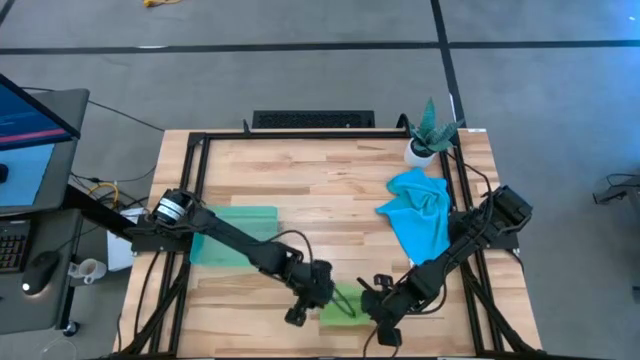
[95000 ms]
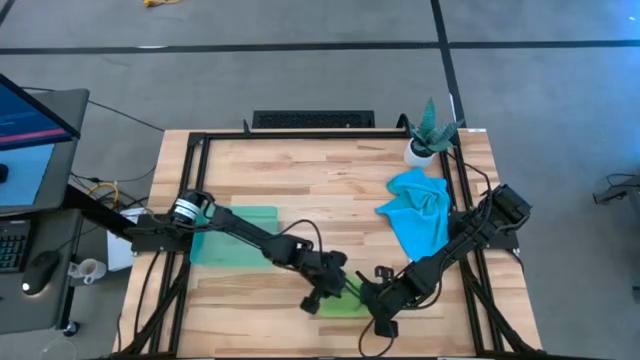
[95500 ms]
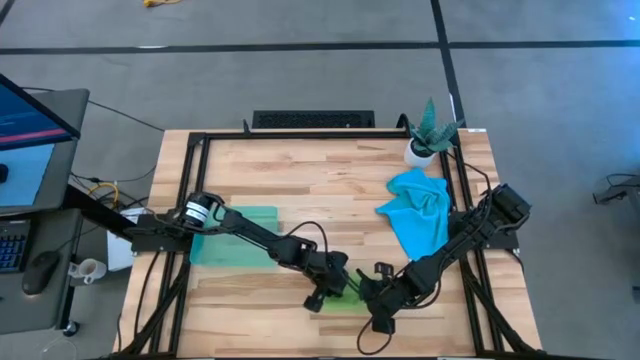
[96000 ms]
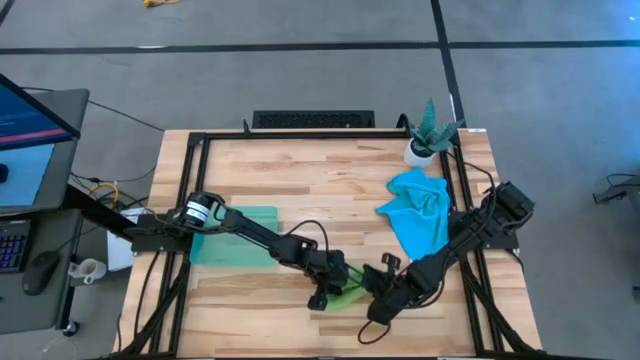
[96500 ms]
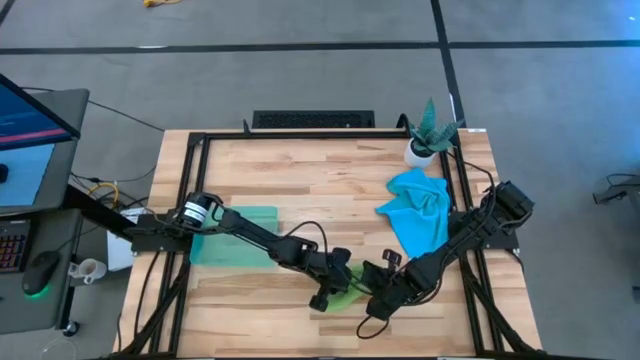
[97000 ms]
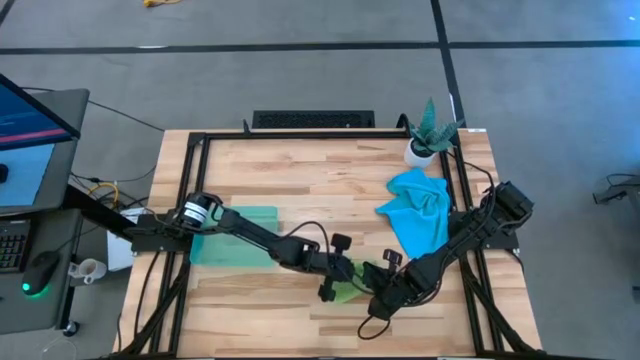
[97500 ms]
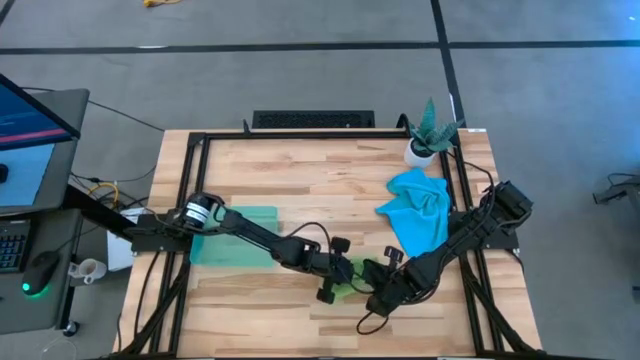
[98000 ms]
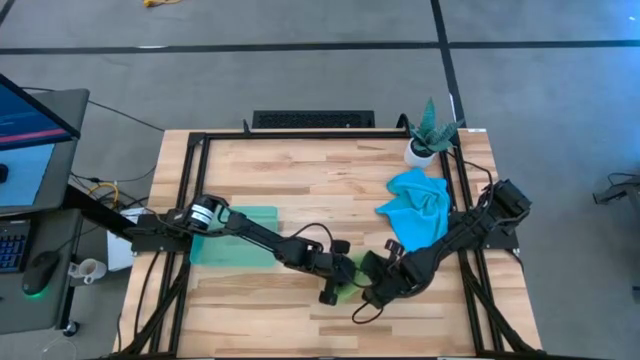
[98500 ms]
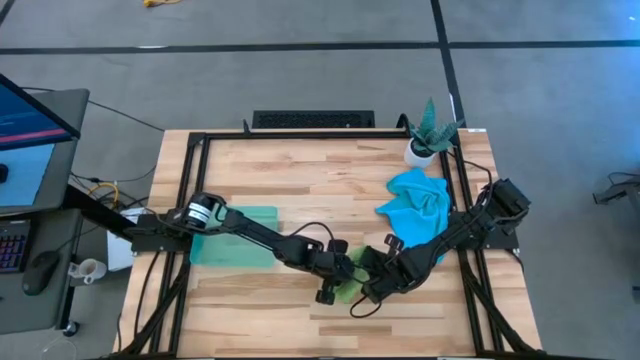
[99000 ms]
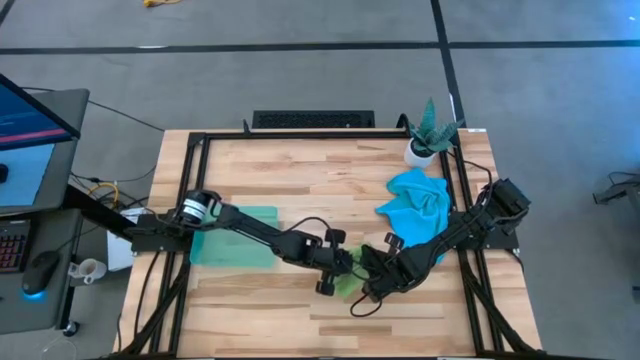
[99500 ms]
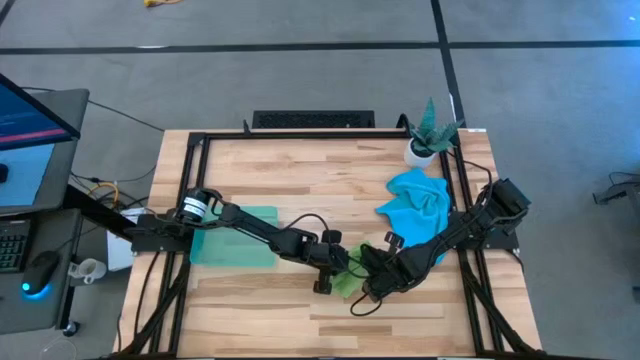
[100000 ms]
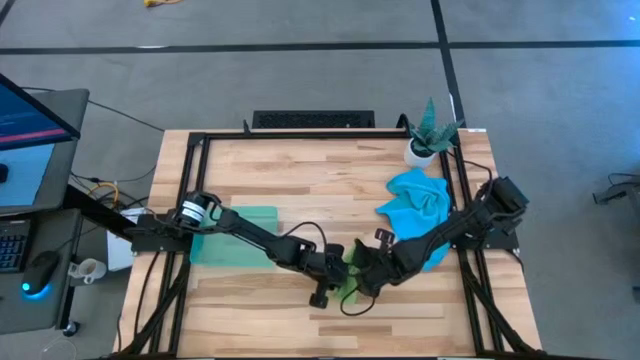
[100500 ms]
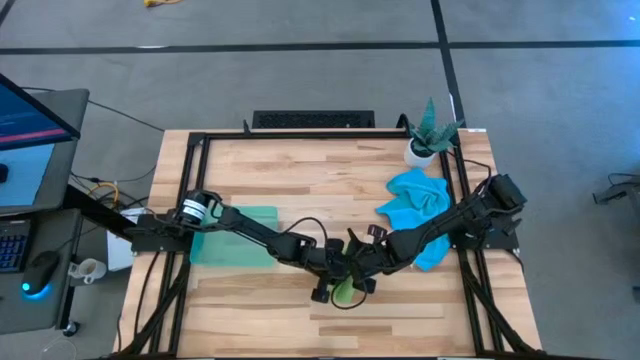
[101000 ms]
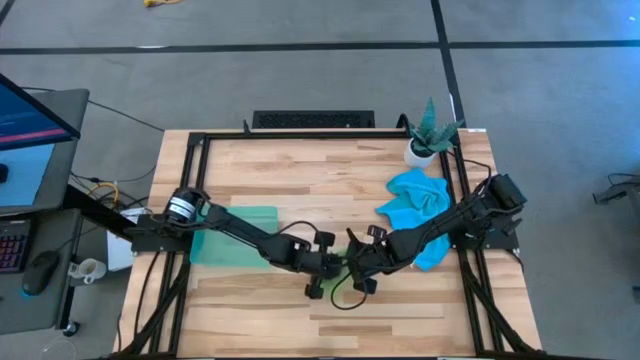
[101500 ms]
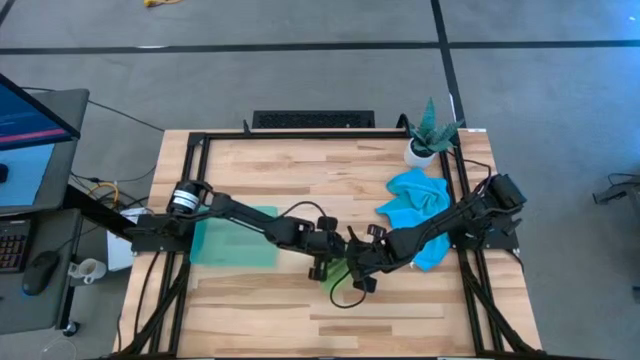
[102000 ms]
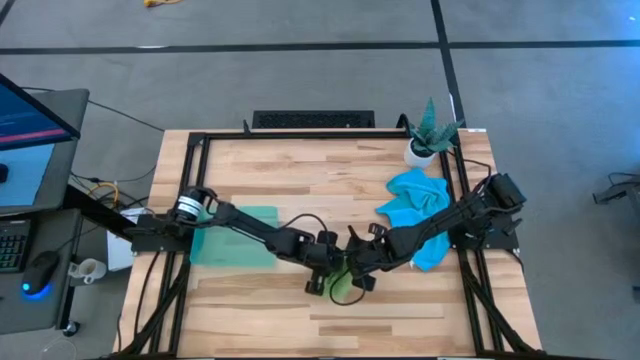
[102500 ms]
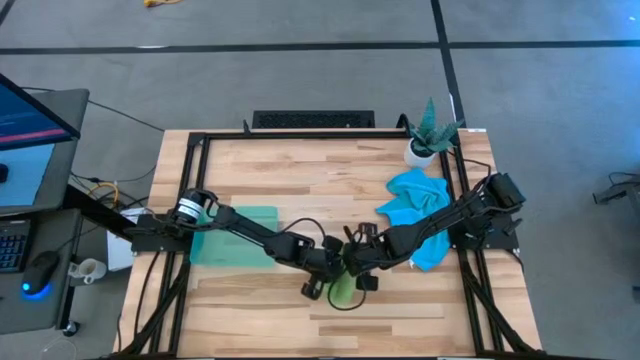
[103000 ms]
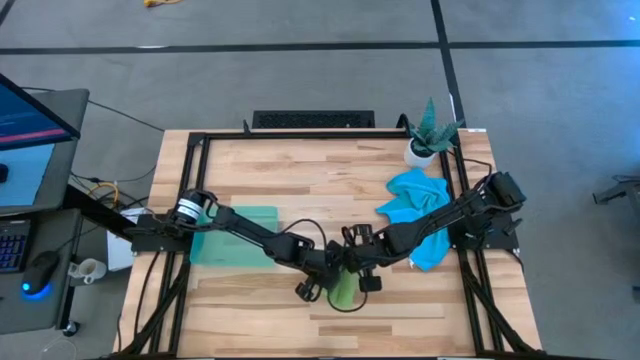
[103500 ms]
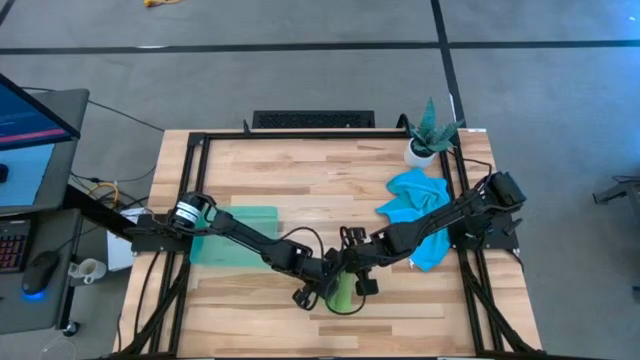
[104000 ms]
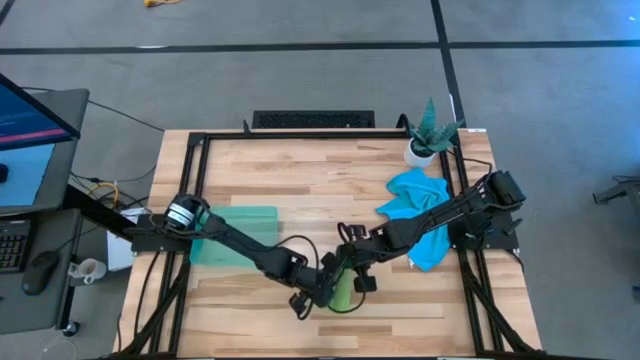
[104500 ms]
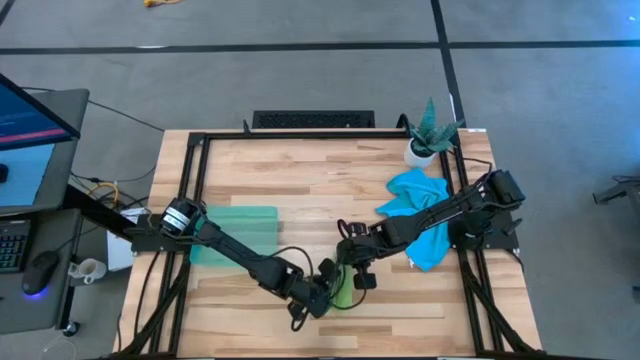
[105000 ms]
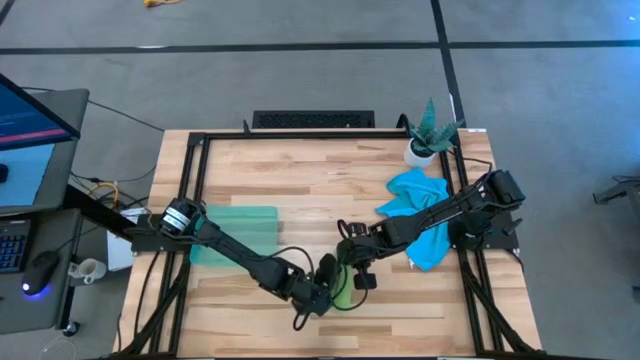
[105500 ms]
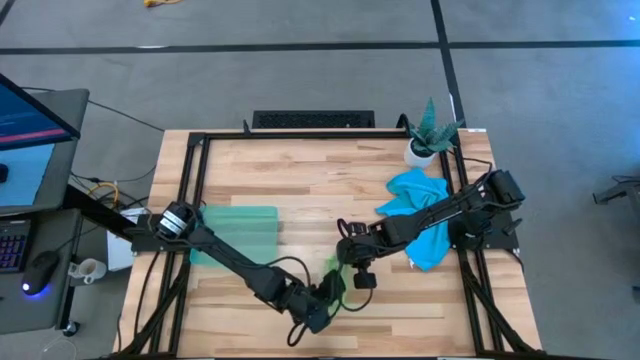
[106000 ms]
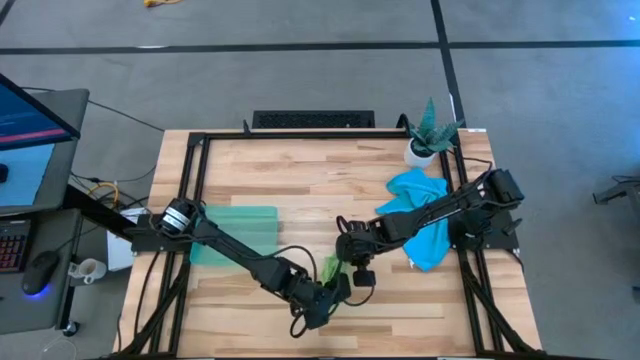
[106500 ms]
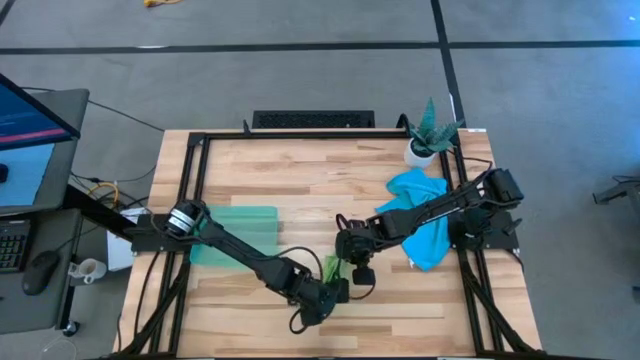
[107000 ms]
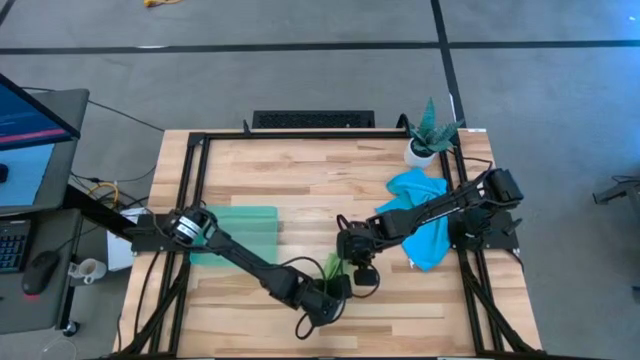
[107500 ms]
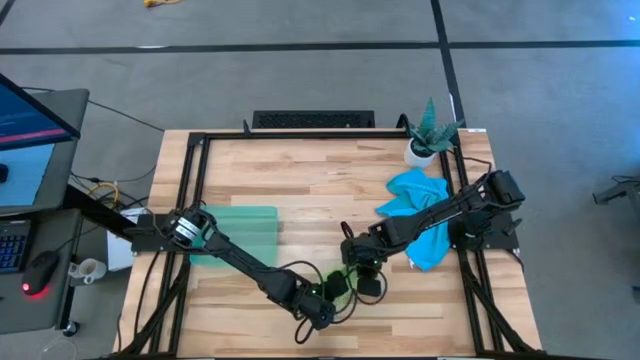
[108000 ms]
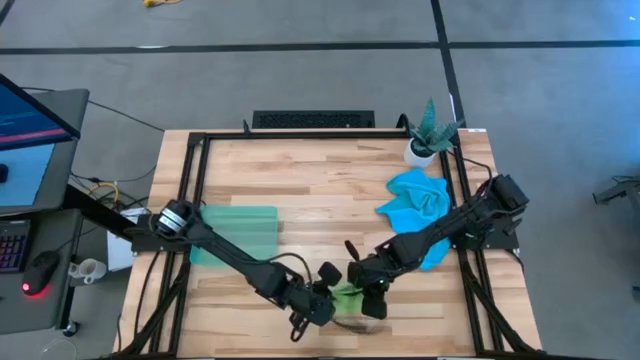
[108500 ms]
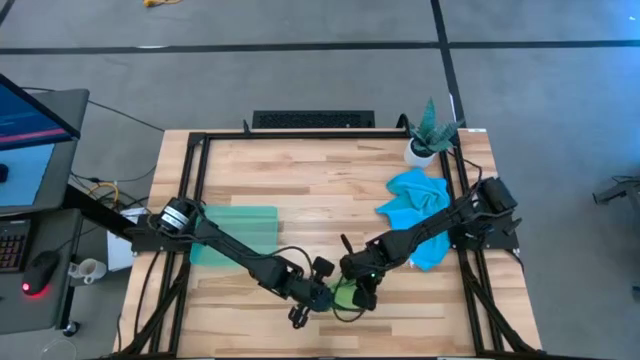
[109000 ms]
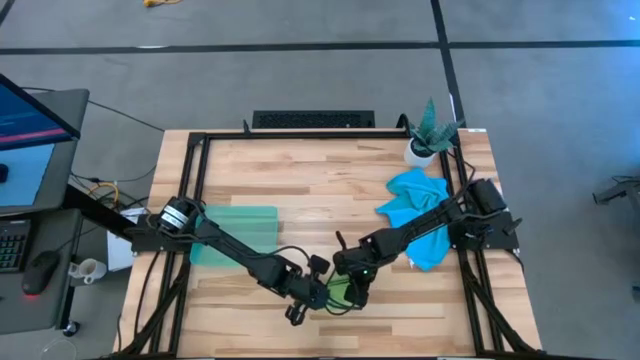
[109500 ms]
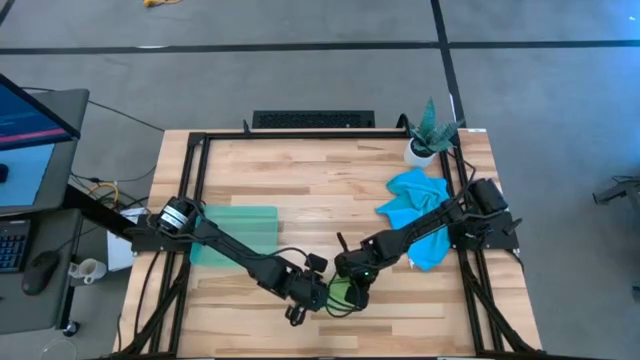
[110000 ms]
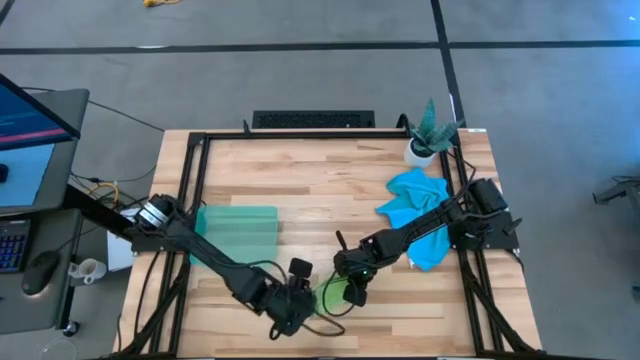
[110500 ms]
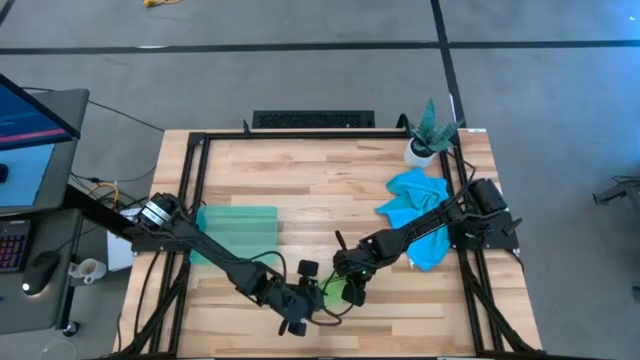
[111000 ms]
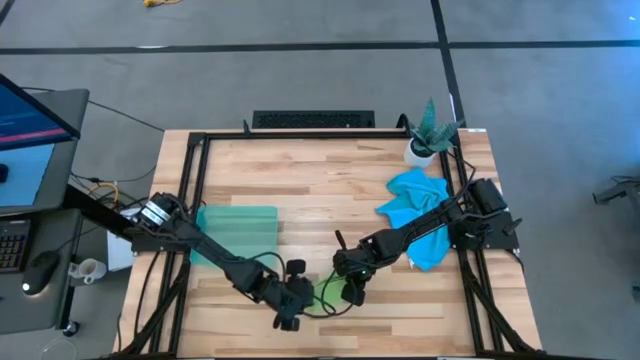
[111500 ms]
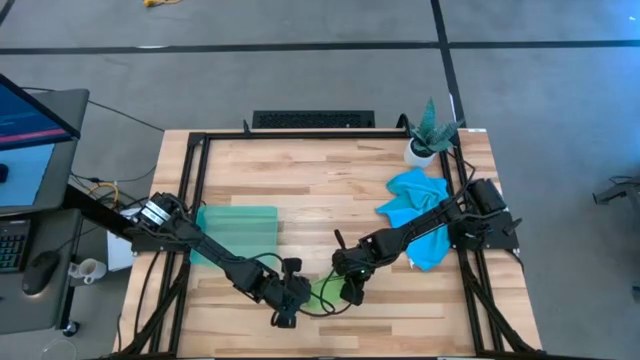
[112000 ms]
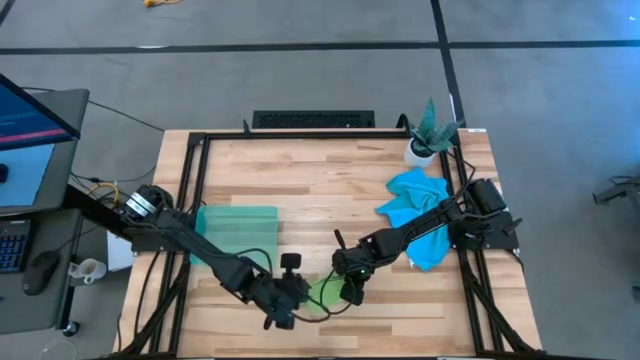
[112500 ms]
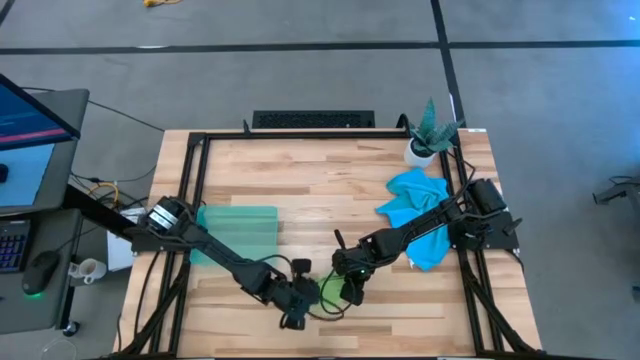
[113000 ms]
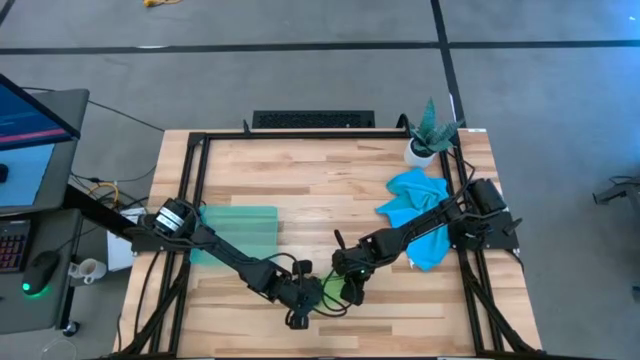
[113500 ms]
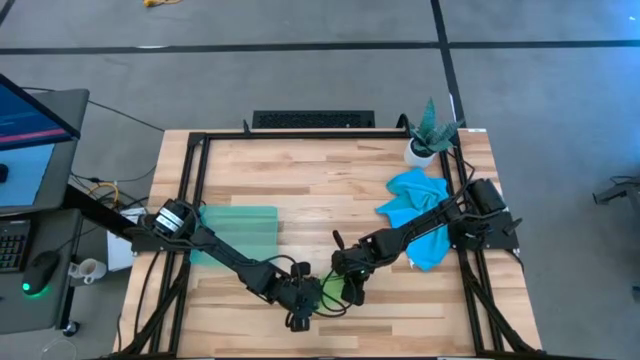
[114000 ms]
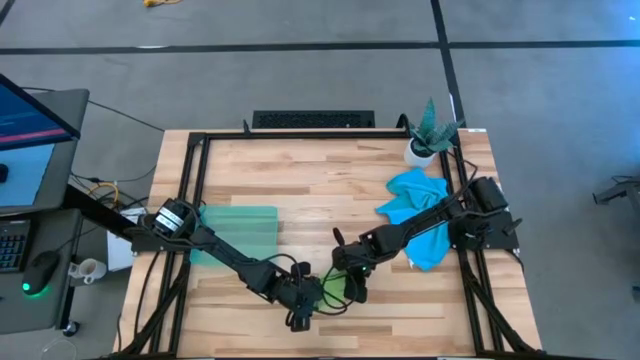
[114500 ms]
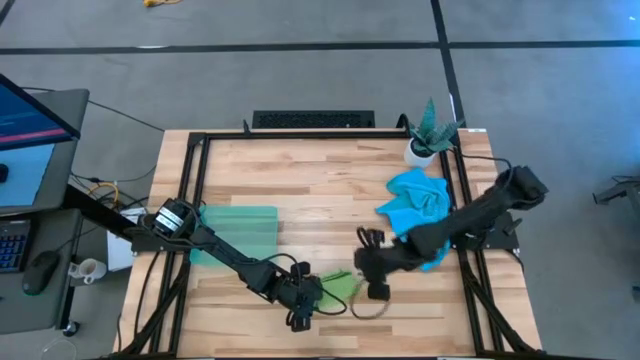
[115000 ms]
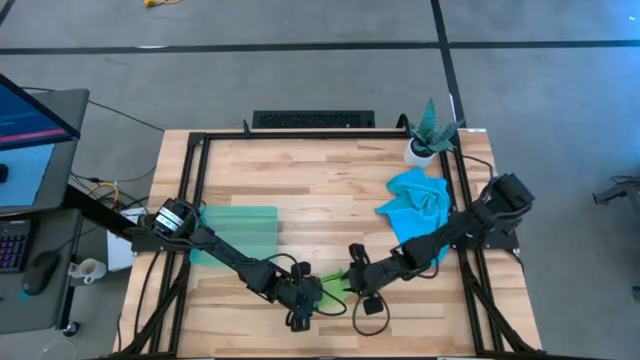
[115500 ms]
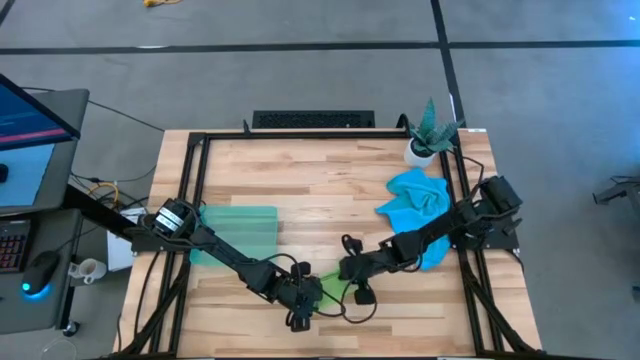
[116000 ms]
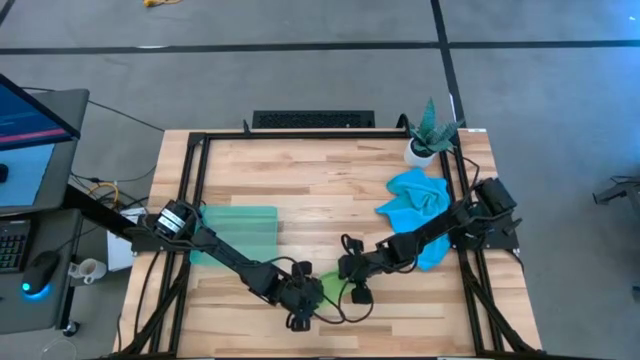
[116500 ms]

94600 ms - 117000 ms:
Task: Roll microfiber towels into tight, uniform cylinder then place into a basket
Roll the green towel
